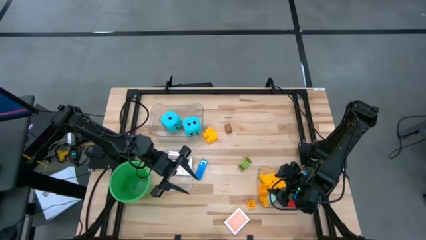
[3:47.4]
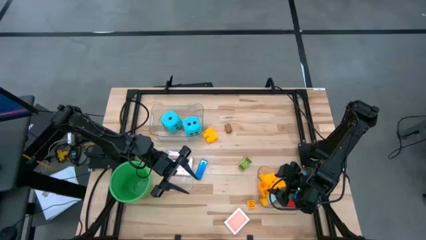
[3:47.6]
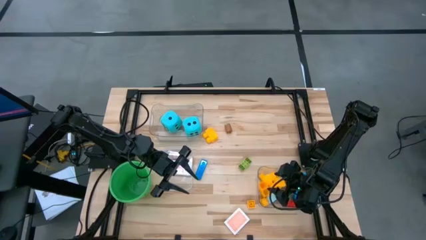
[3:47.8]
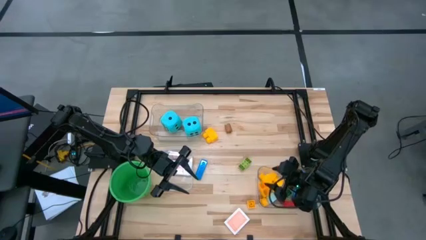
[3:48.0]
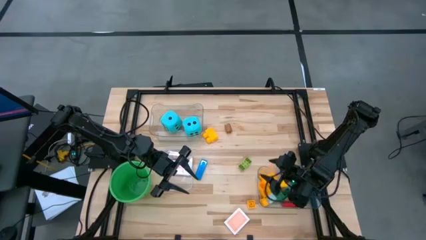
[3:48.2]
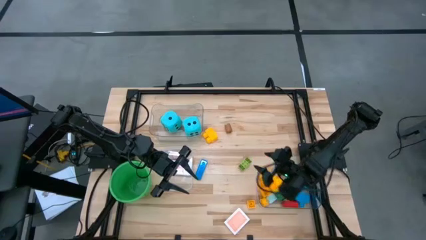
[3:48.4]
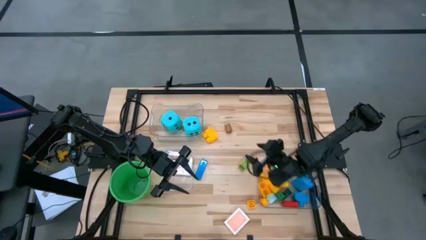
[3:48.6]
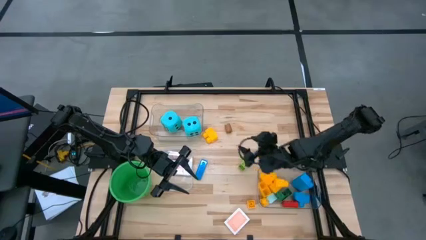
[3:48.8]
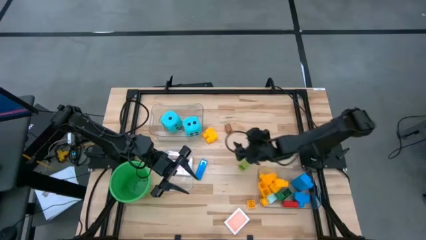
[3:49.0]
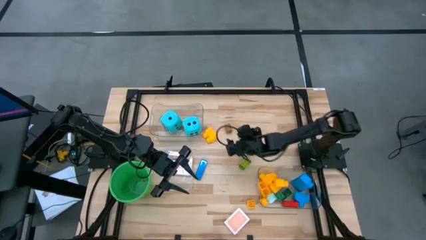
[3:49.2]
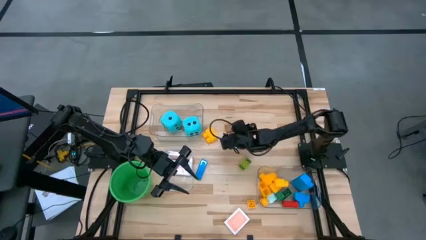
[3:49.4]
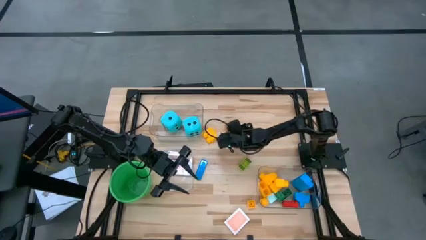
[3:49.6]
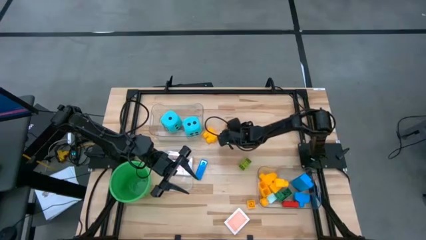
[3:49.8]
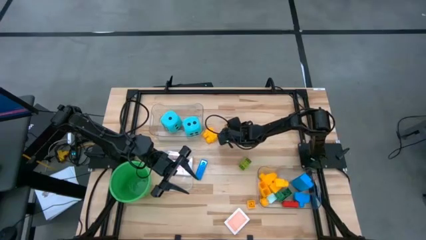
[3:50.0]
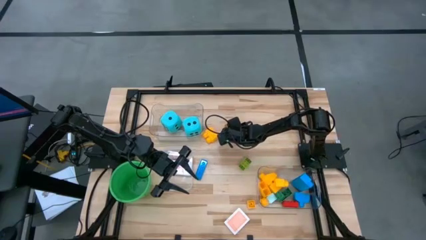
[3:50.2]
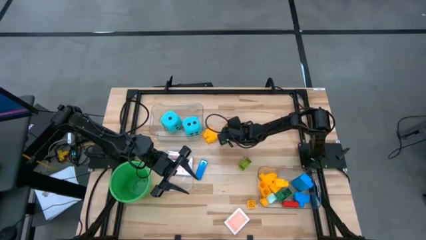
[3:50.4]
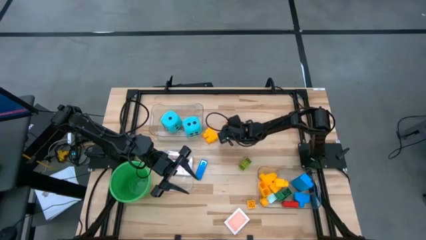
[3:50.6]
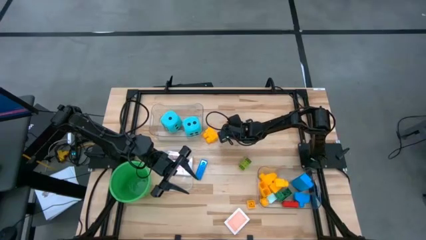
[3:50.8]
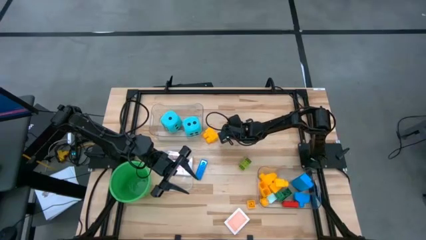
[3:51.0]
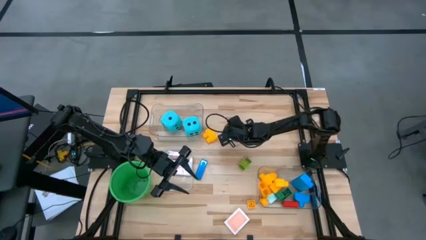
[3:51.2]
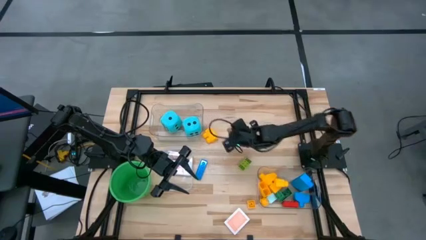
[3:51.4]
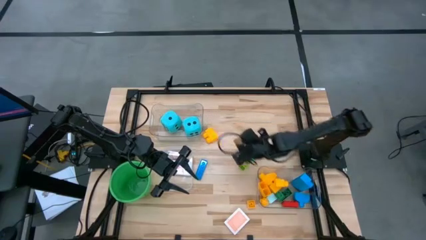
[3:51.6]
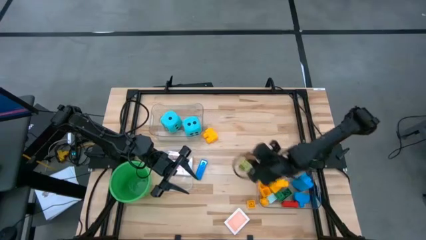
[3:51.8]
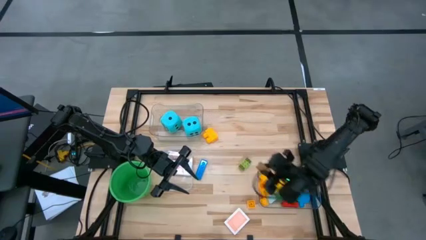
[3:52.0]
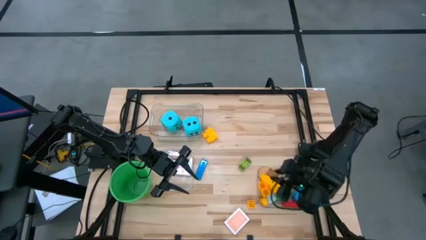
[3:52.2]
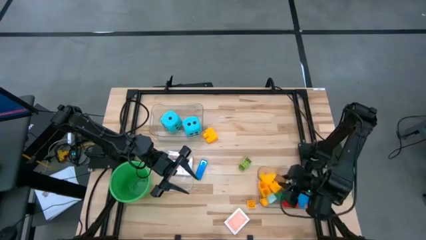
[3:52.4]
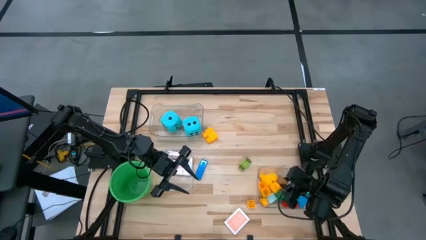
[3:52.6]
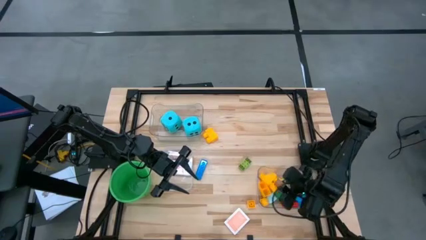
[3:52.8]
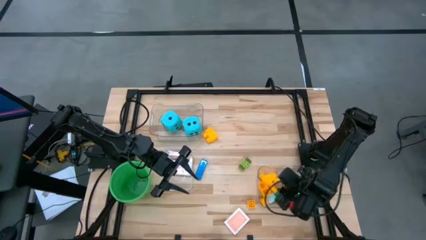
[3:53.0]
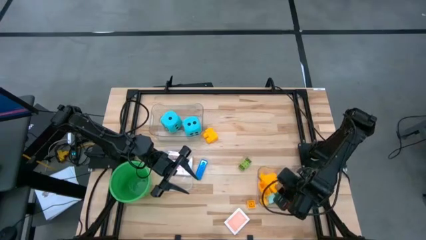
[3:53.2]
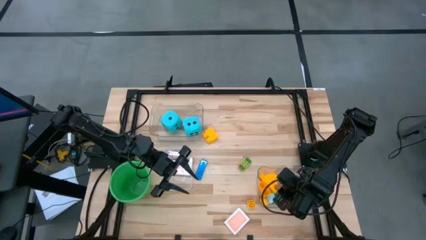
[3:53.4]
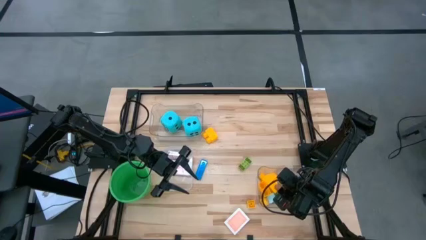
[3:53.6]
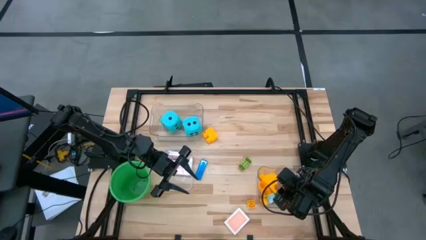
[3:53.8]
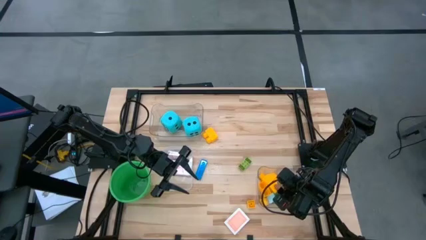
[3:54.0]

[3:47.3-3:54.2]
Task: Pick & Place Toys
Put the brown game piece into the bottom right transparent bin

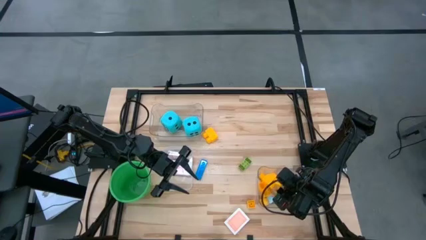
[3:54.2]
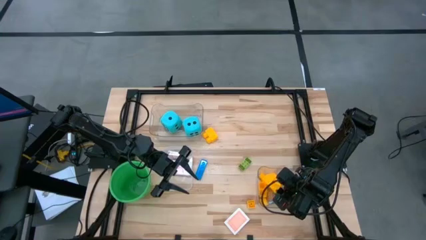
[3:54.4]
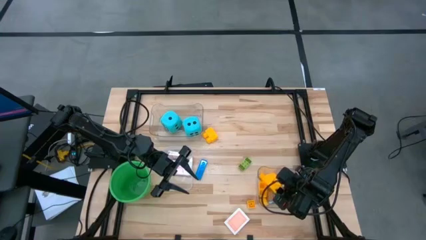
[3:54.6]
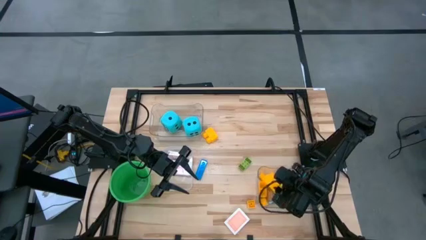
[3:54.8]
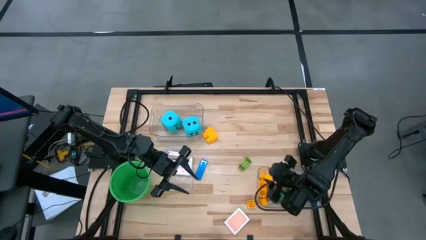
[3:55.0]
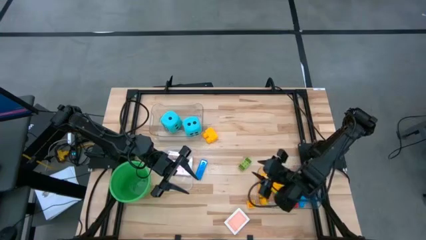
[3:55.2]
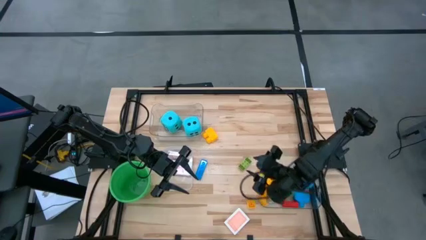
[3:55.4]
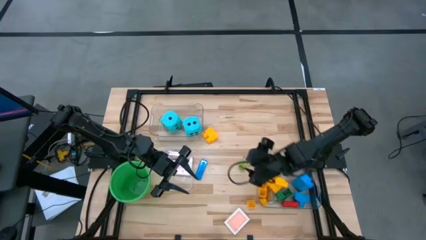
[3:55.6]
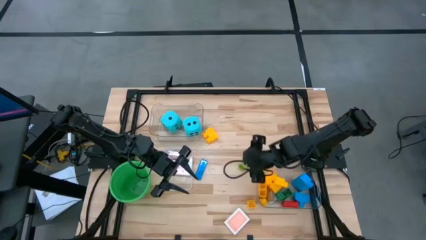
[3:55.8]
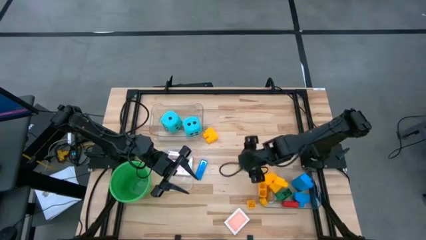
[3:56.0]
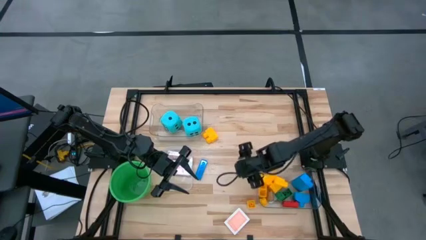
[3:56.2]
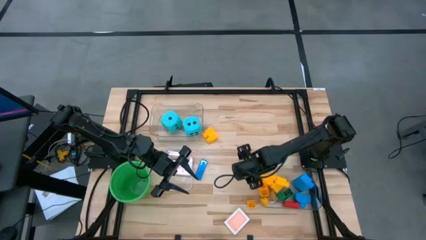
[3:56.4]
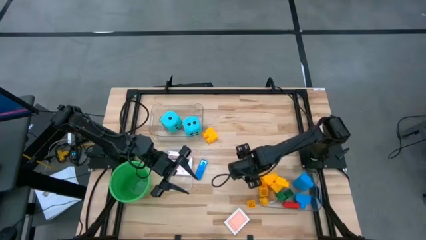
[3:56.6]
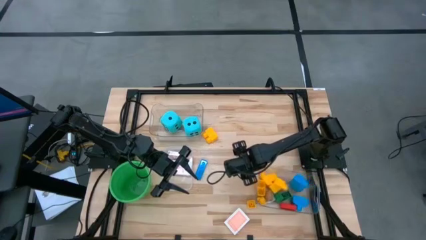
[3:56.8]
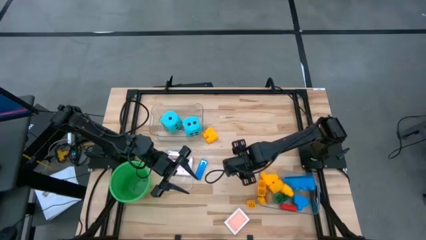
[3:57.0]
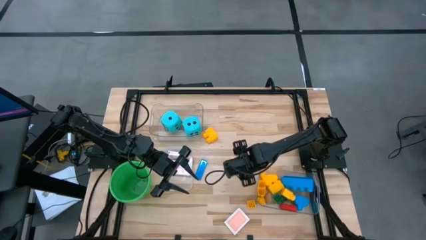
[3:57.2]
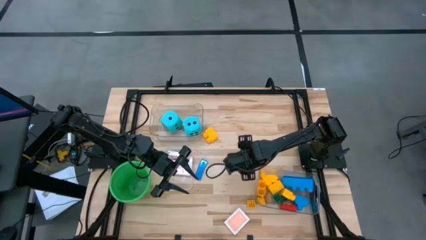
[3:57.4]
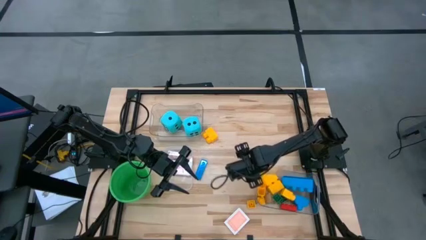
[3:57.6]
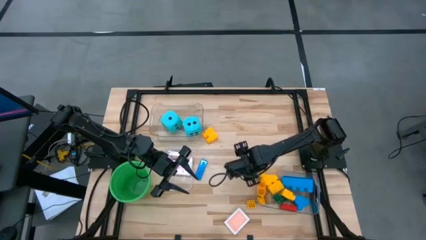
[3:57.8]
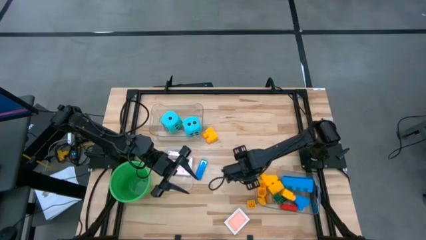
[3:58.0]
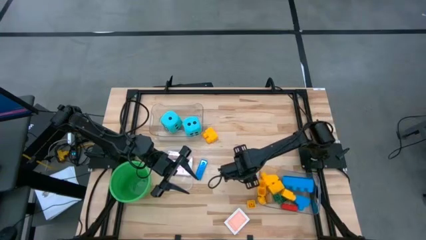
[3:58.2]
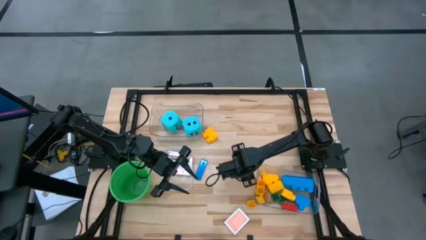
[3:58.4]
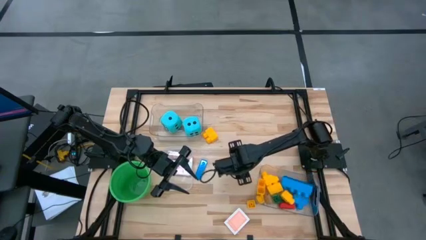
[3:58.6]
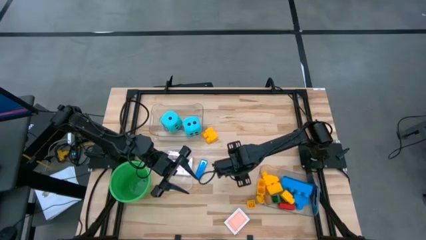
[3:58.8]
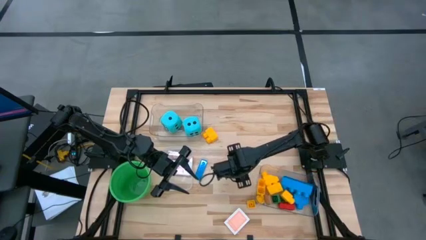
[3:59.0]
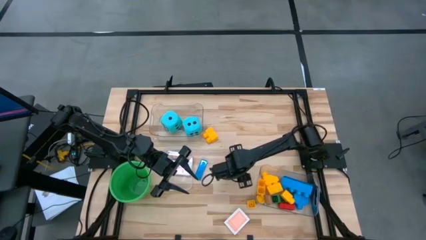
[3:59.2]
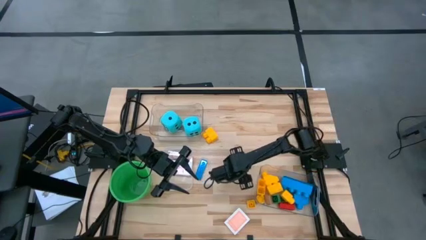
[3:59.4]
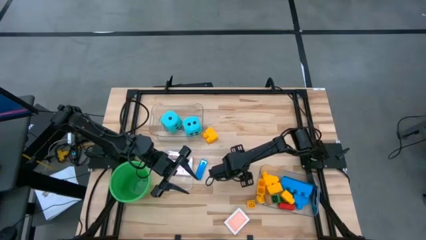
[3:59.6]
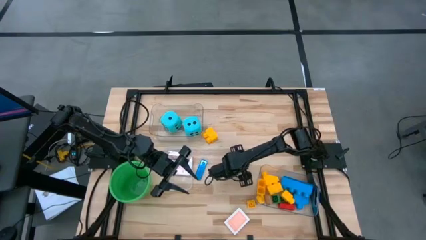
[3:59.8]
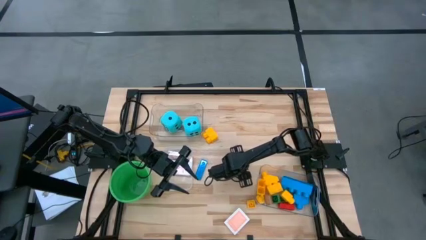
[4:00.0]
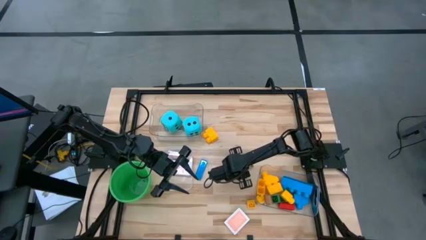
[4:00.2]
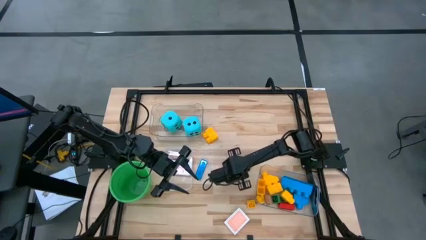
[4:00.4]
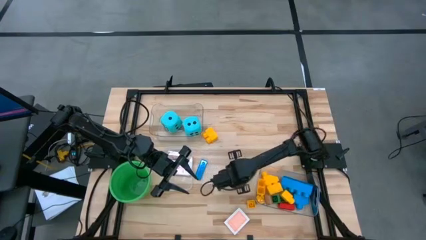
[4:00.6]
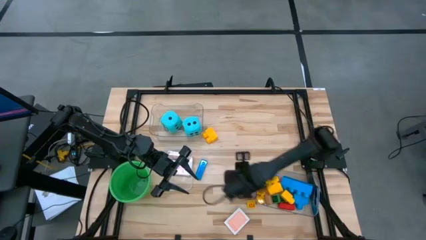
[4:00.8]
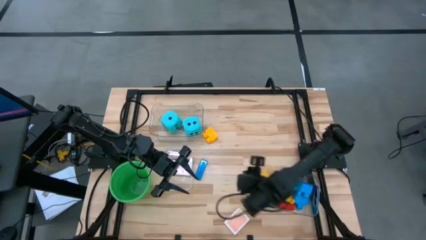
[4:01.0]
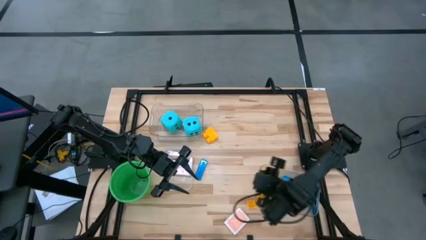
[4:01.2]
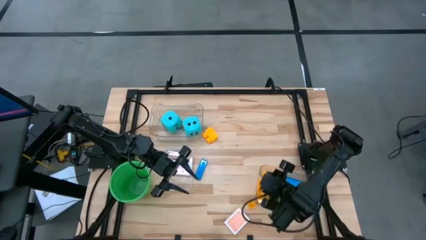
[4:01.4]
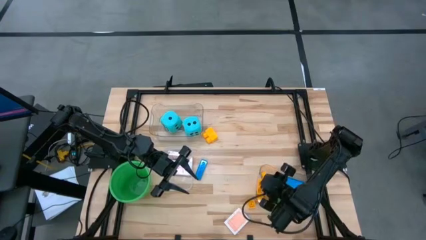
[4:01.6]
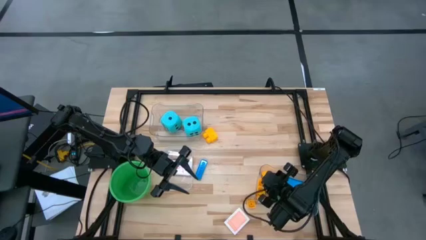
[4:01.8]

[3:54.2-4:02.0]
Put the light green game piece into the bottom right transparent bin

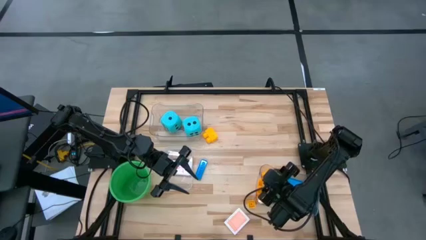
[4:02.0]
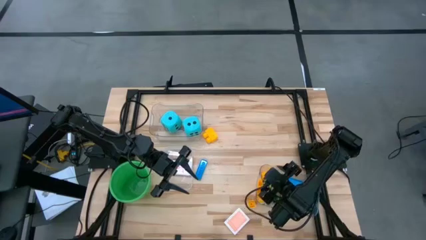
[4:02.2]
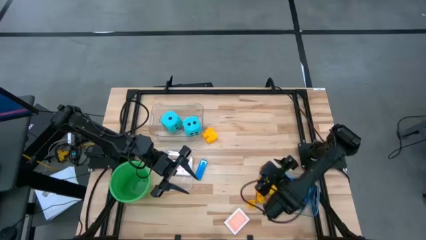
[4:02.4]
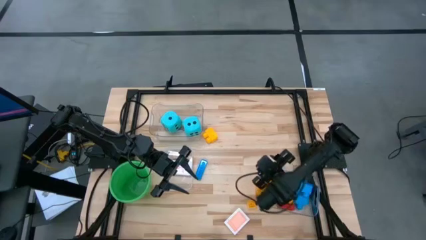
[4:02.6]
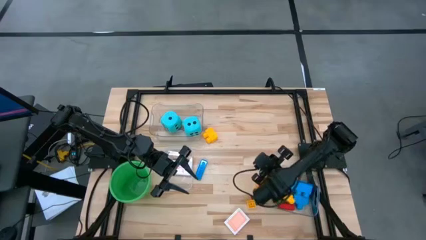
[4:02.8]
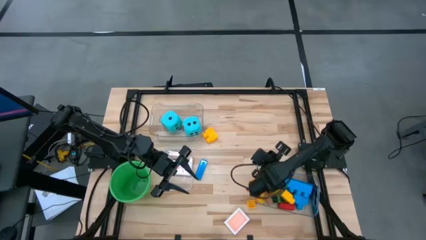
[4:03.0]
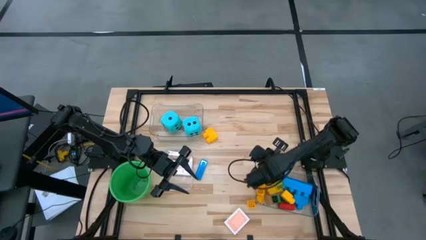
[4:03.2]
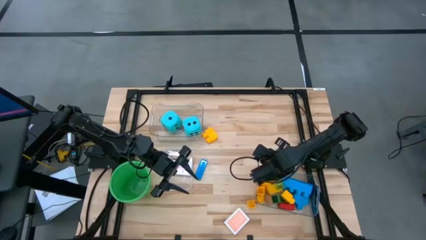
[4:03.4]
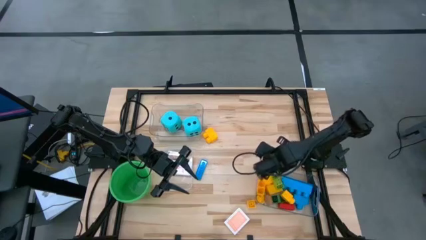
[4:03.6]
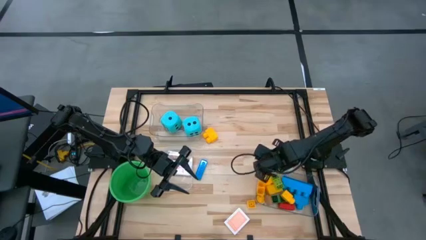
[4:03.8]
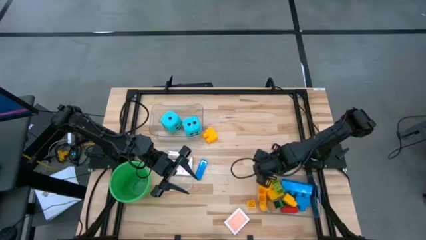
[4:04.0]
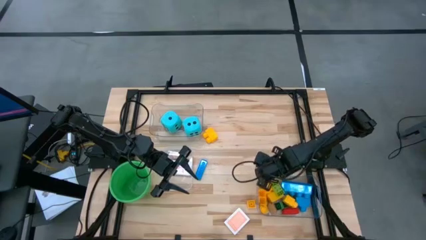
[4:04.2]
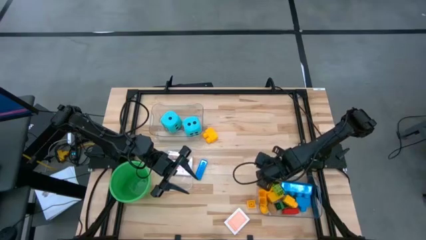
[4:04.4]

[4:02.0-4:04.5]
Adjust the bottom right transparent bin
